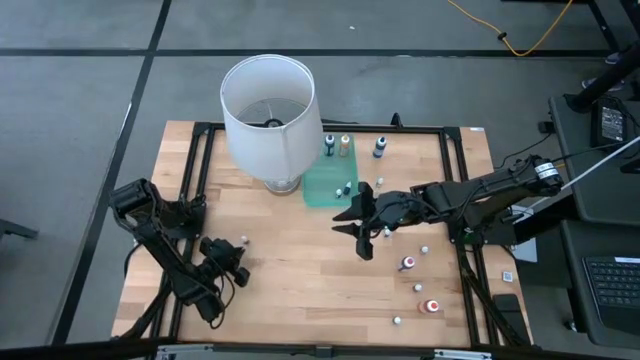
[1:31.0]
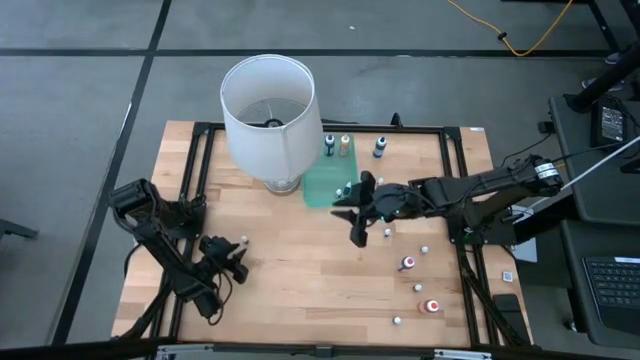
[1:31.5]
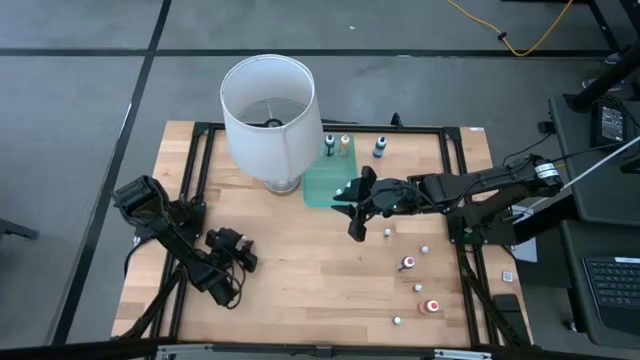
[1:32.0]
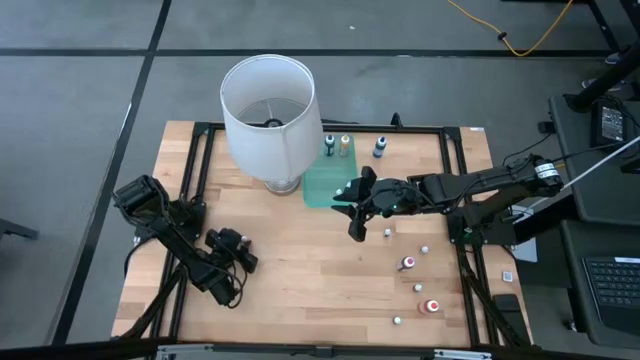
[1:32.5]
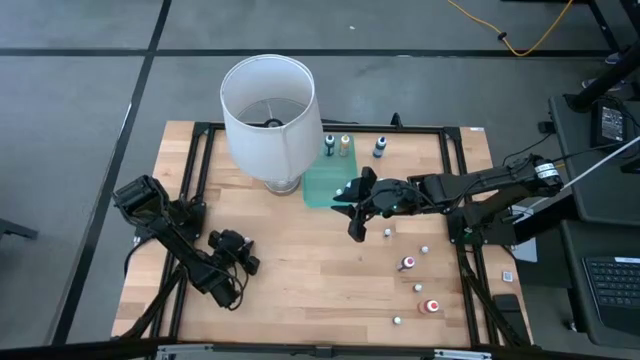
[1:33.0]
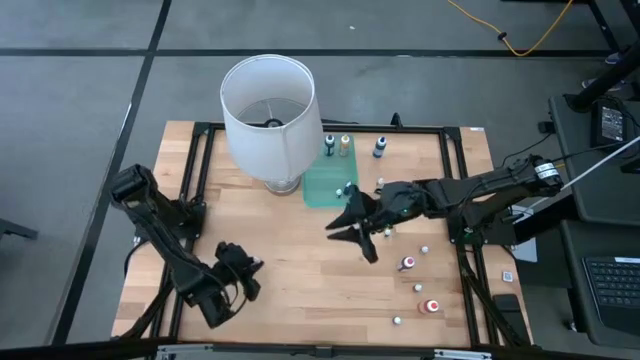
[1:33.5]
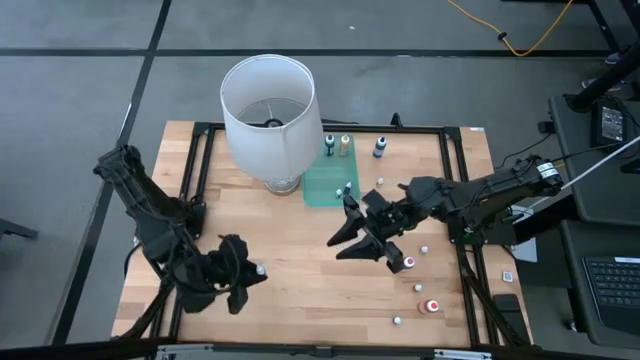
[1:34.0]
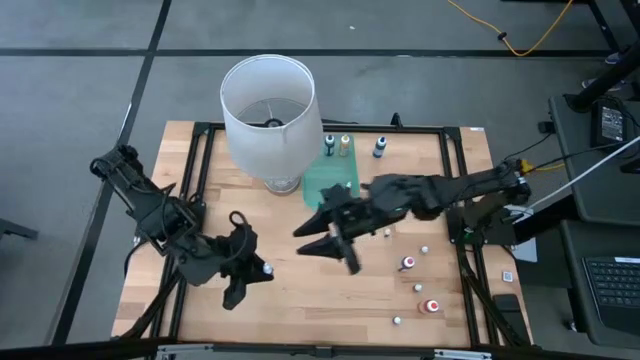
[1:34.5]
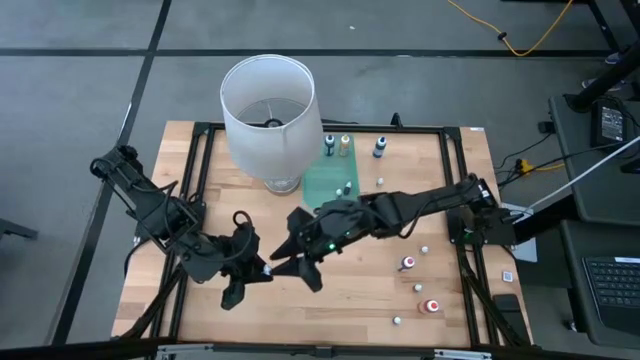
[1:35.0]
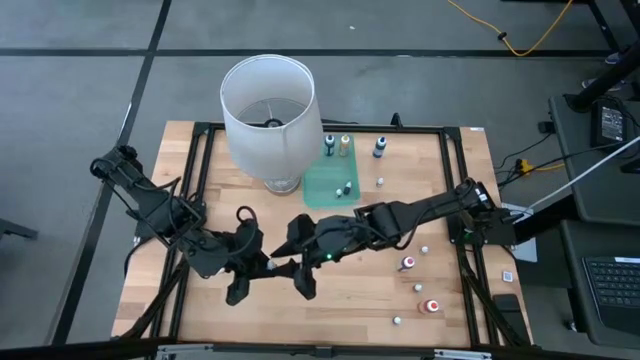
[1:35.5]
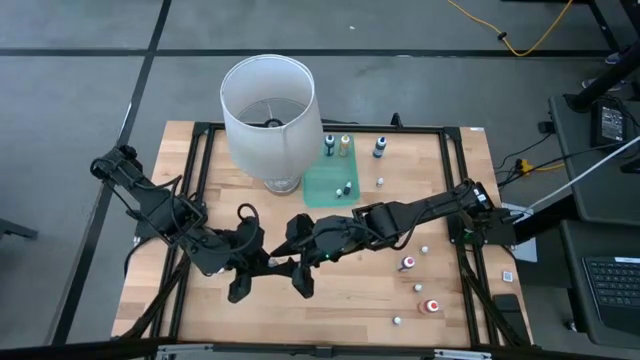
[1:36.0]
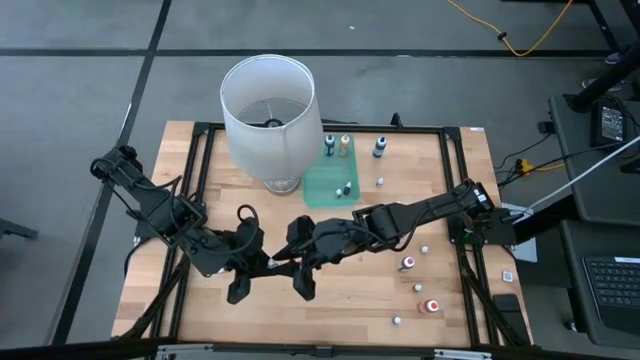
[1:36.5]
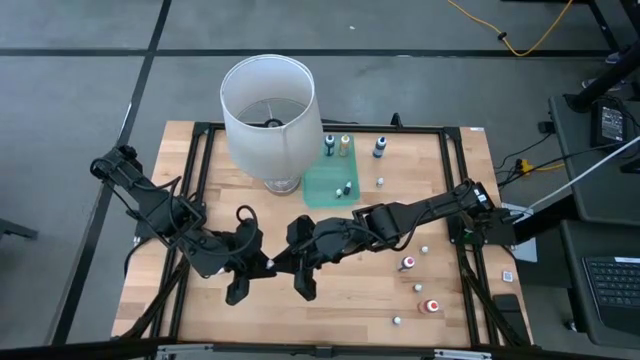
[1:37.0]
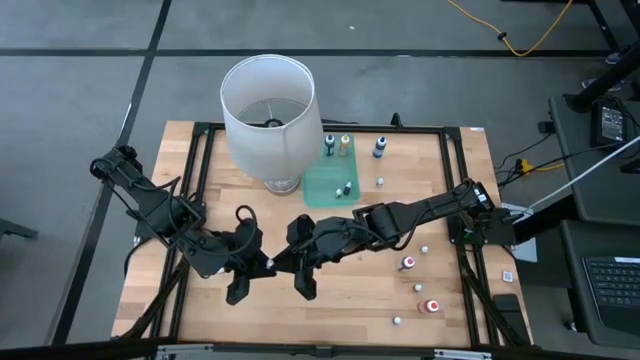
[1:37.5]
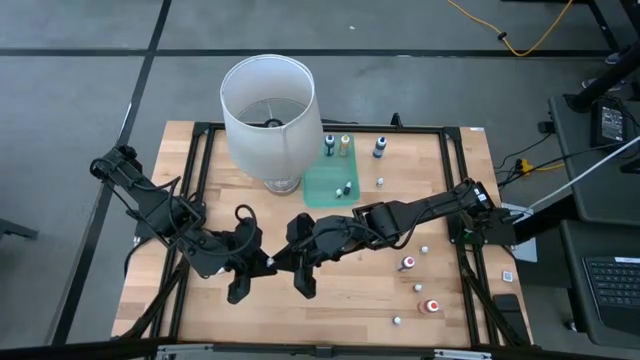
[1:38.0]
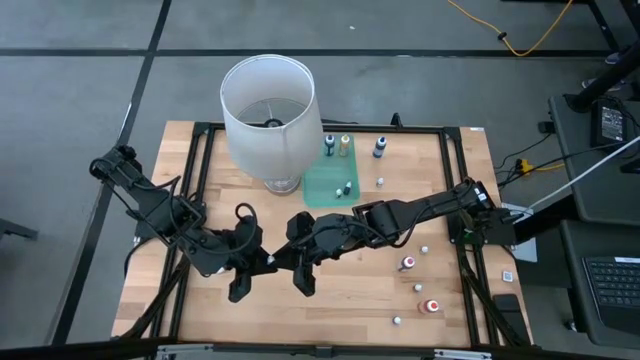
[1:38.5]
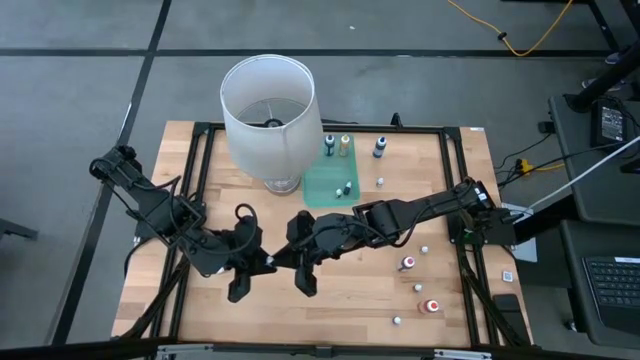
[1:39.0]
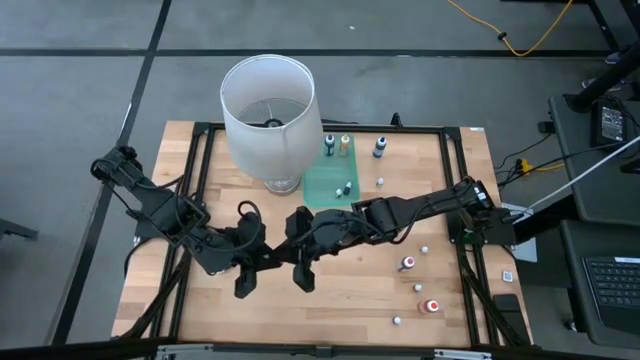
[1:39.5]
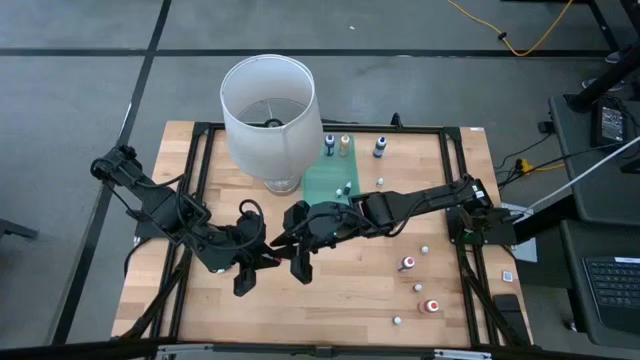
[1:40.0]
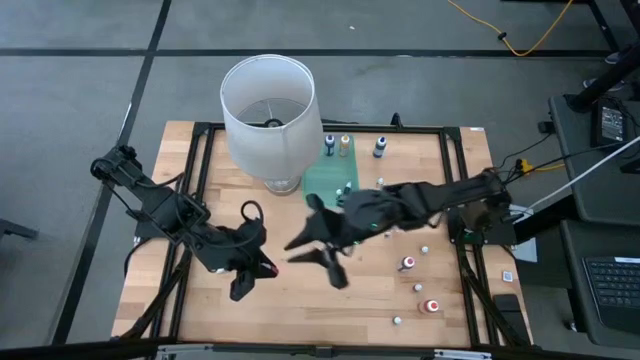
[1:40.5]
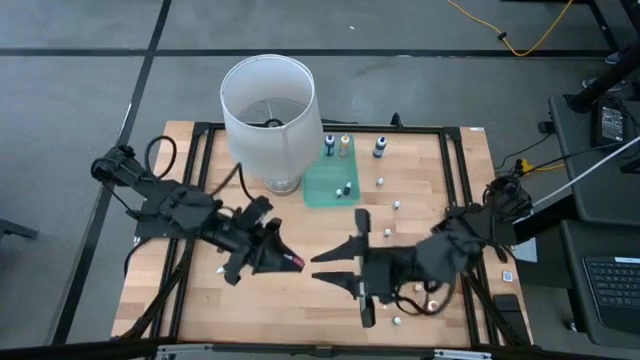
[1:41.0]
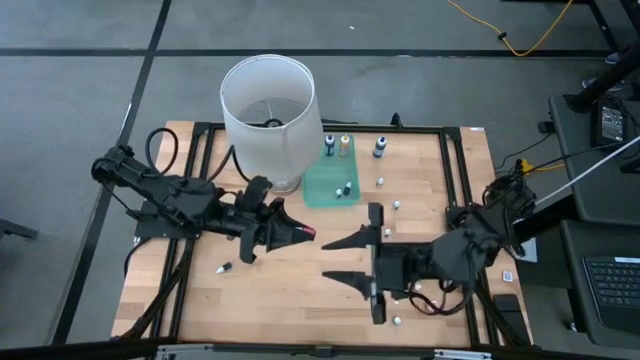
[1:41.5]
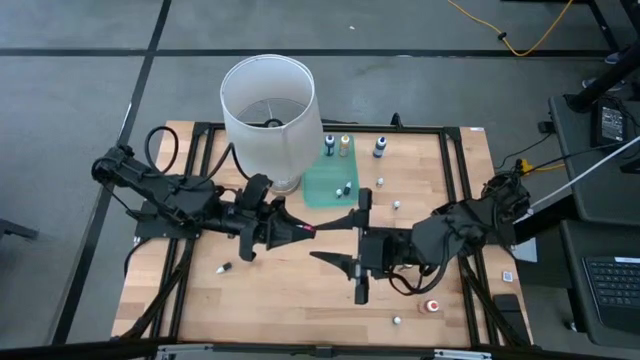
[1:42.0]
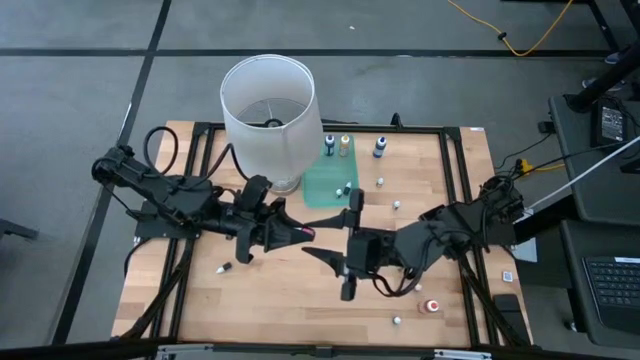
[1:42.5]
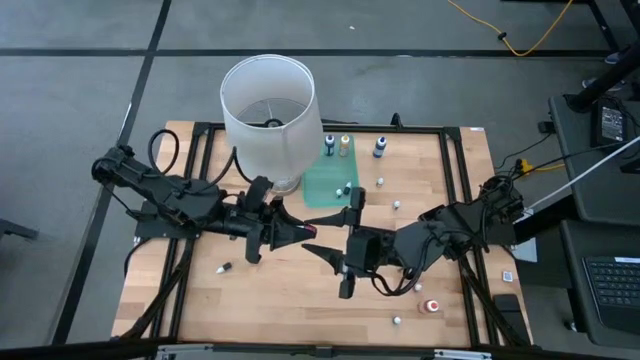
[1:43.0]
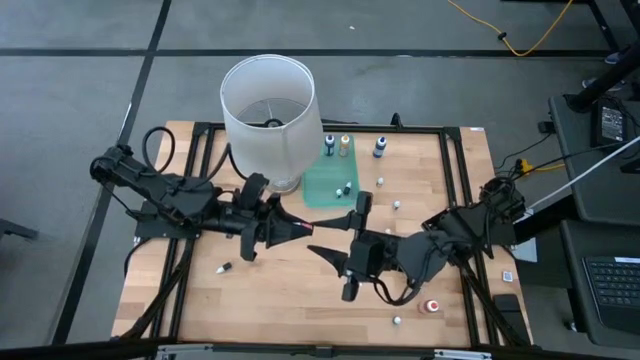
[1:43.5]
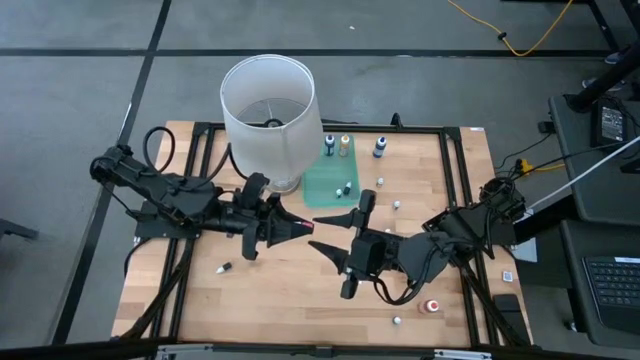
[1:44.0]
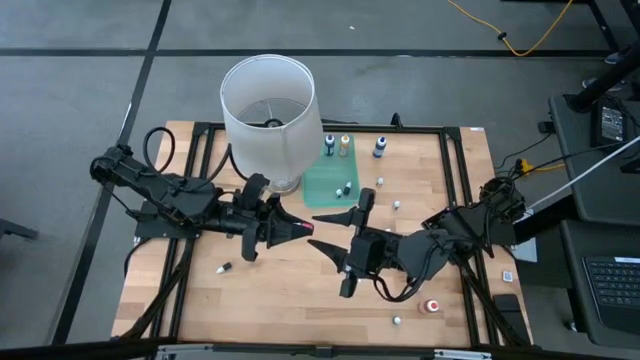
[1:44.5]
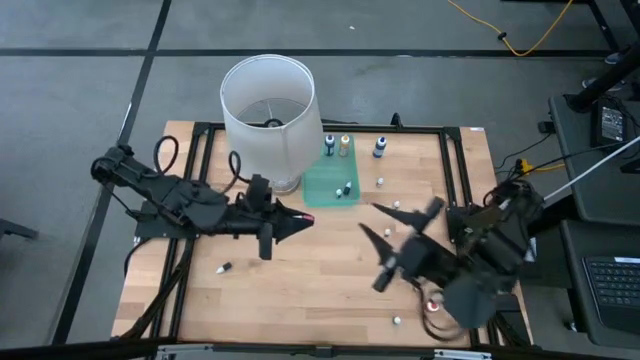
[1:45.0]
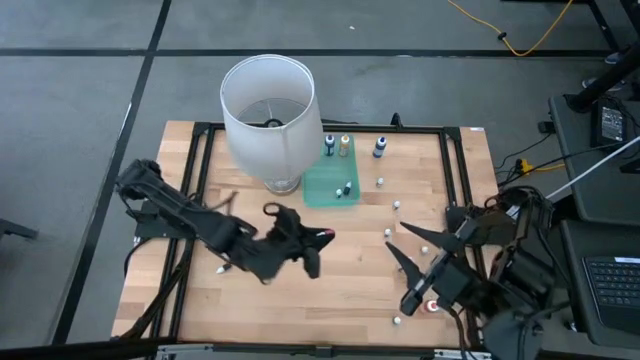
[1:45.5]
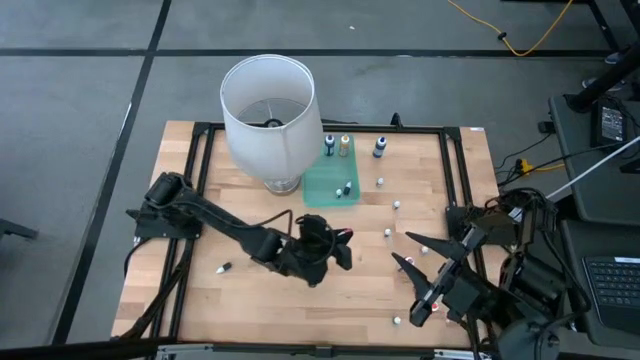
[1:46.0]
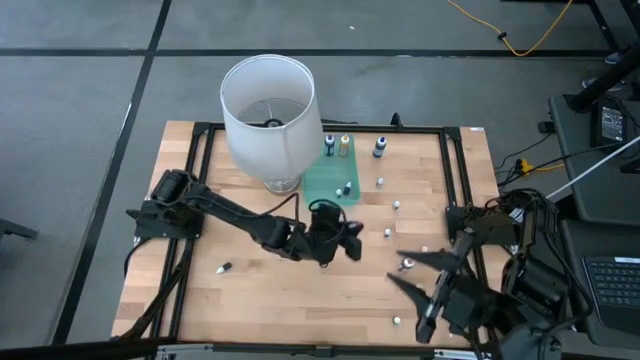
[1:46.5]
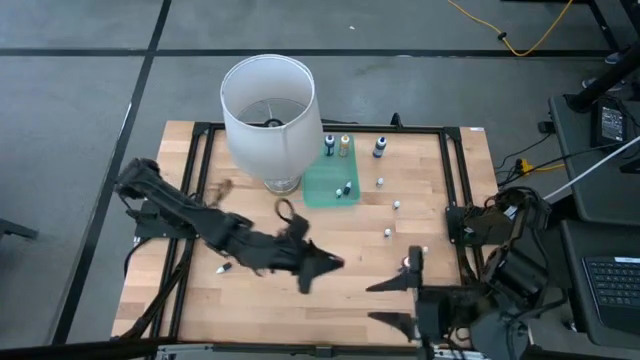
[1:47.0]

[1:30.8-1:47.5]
Task: Pick & Place food coloring
Put the top left small red food coloring bottle into the green bin

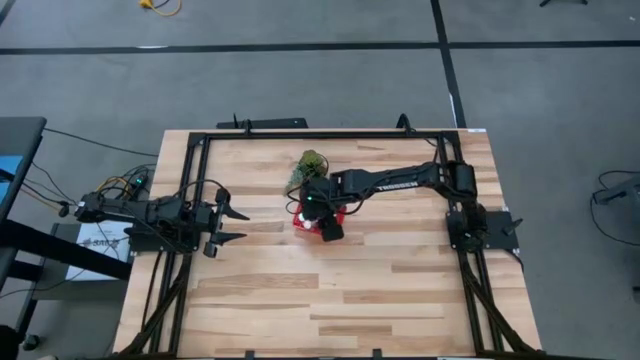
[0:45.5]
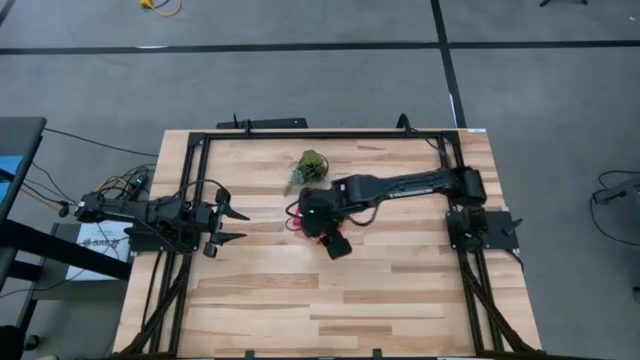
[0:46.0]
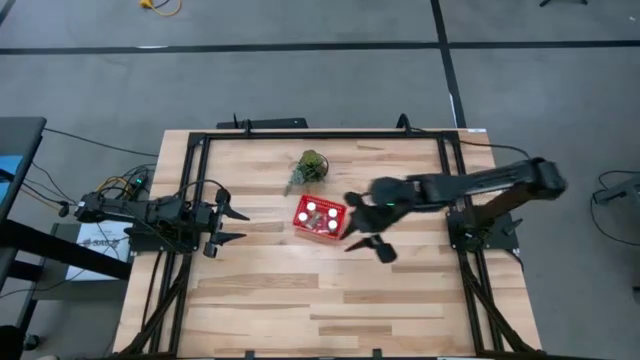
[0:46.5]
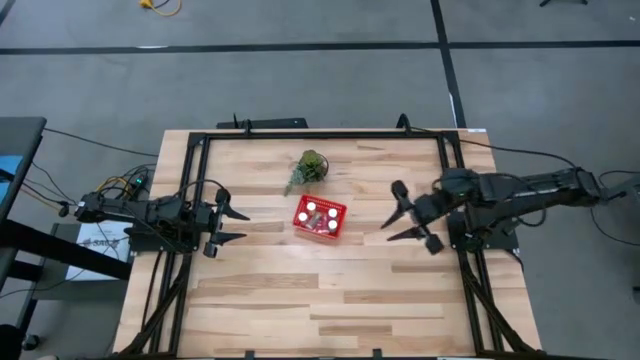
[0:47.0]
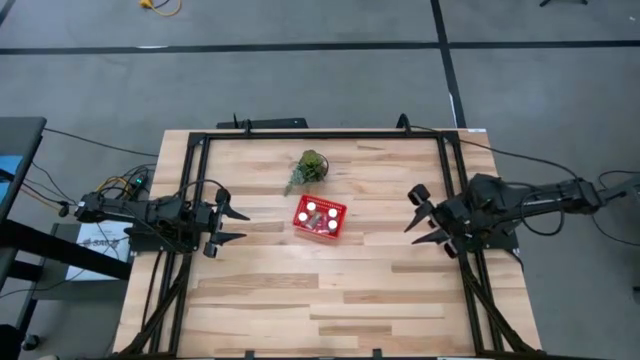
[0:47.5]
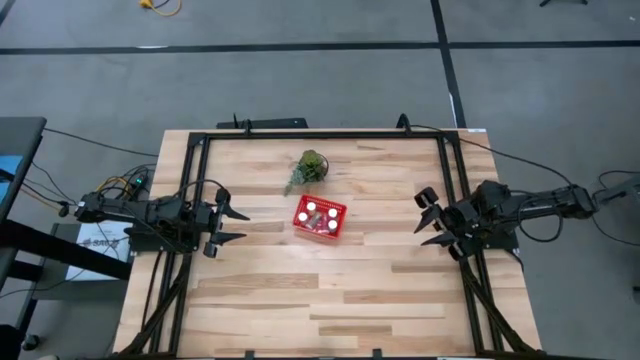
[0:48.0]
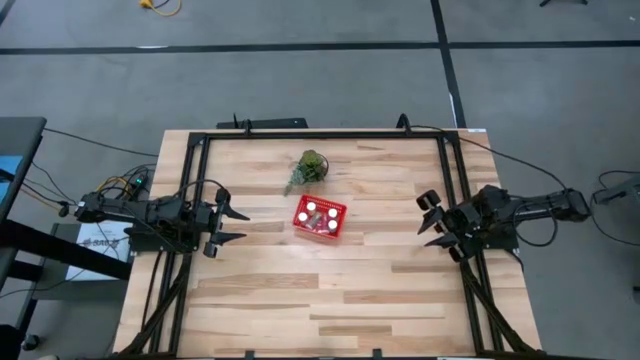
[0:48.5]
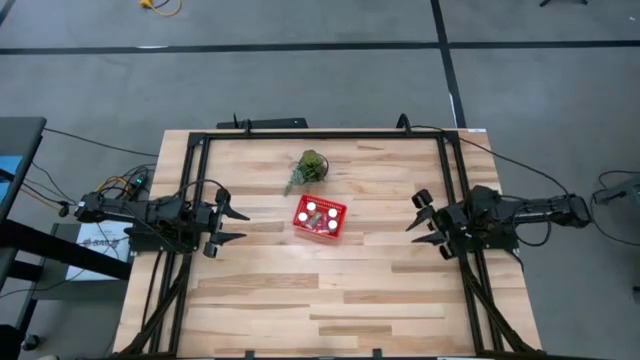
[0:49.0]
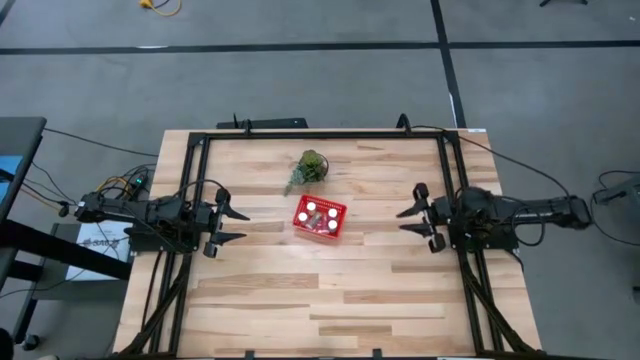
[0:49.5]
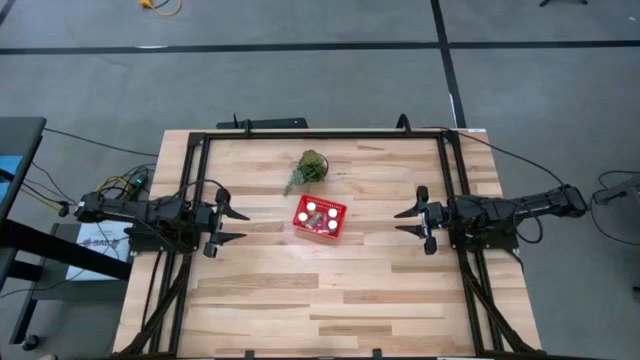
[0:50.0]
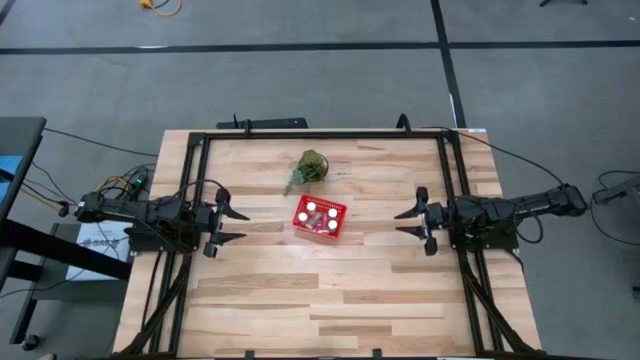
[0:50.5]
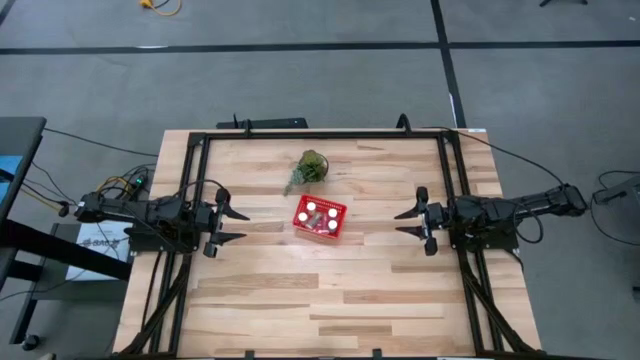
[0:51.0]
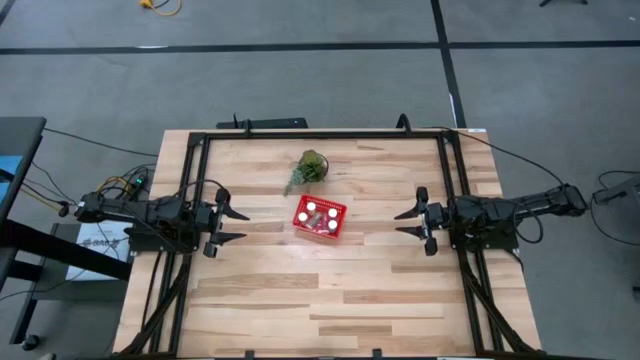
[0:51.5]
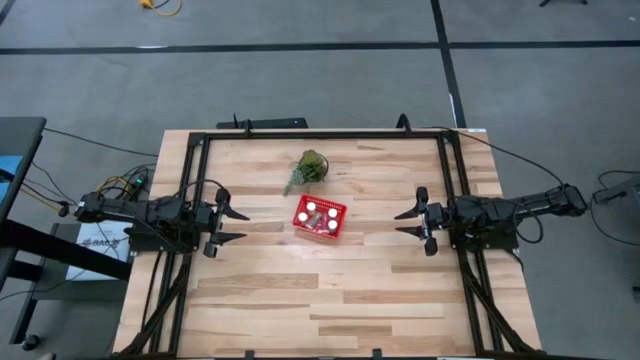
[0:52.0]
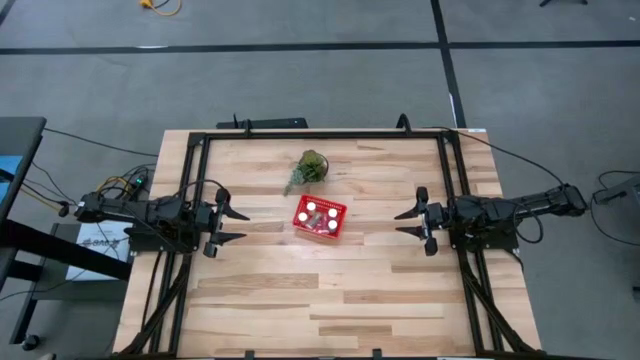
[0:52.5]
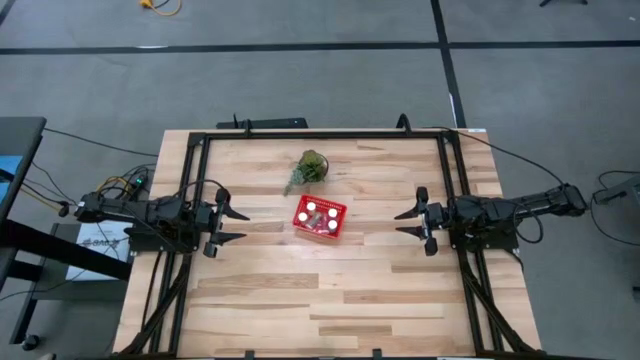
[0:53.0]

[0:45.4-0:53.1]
Task: Pick and place pill bottles into a basket
Return to Home Position
